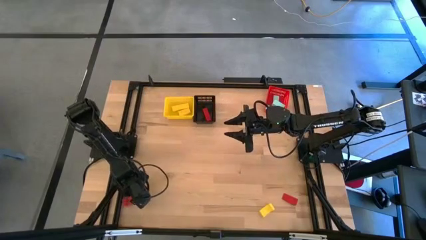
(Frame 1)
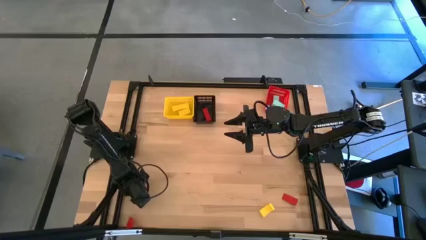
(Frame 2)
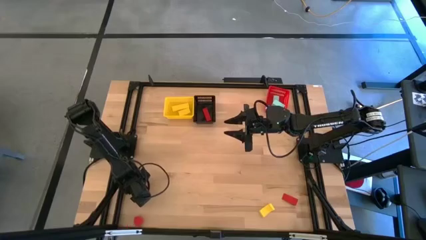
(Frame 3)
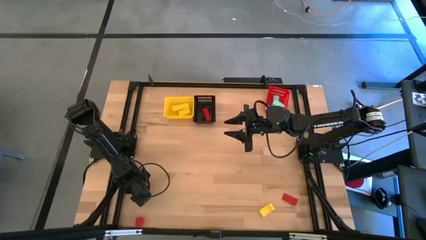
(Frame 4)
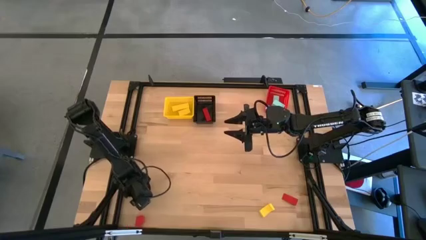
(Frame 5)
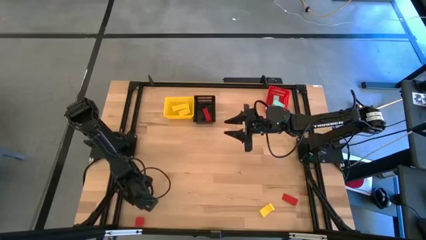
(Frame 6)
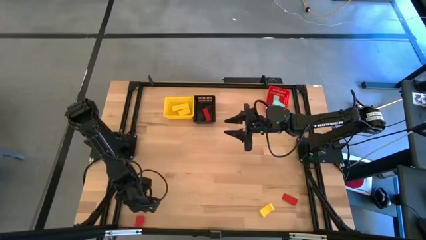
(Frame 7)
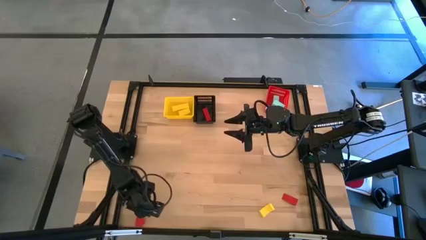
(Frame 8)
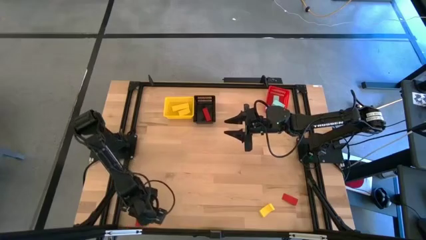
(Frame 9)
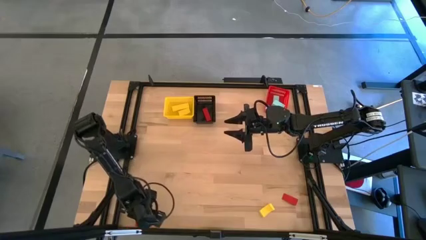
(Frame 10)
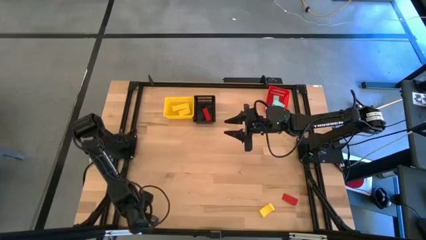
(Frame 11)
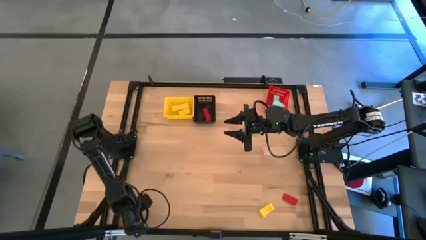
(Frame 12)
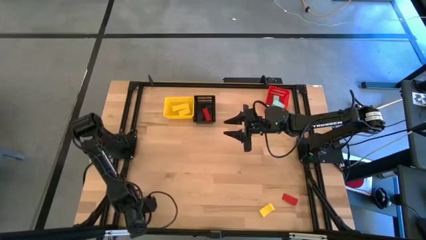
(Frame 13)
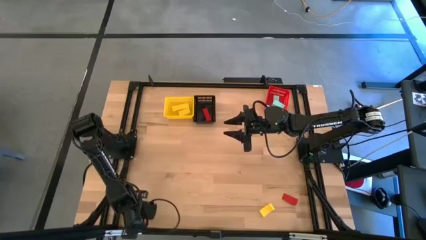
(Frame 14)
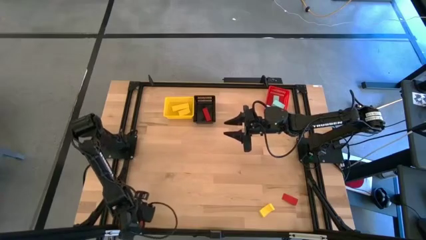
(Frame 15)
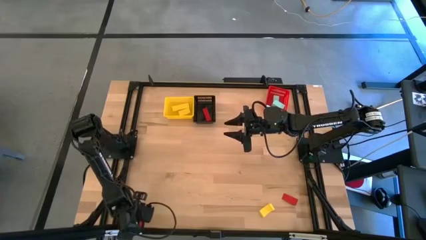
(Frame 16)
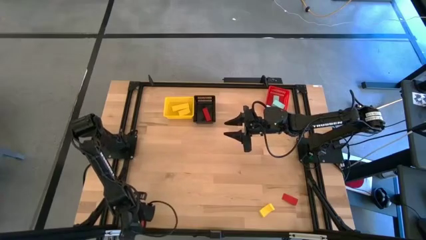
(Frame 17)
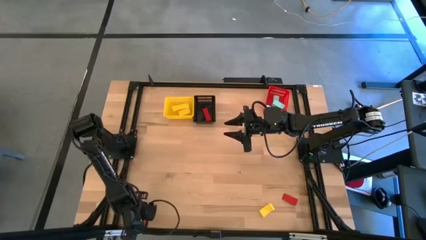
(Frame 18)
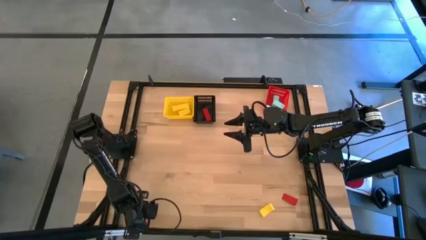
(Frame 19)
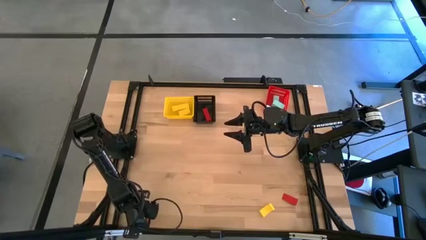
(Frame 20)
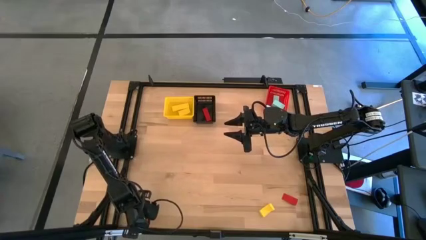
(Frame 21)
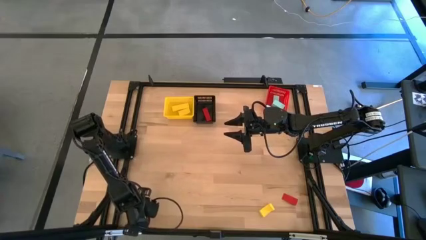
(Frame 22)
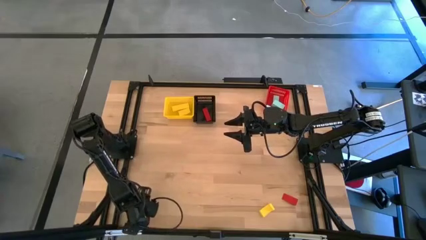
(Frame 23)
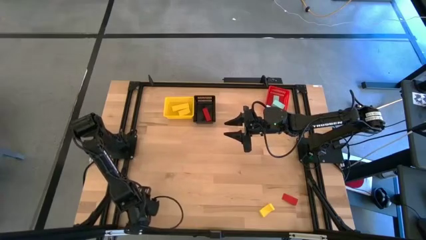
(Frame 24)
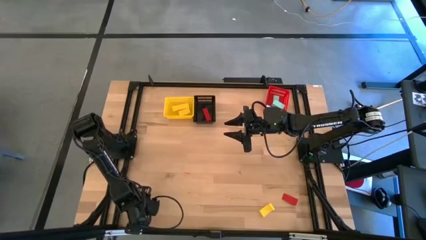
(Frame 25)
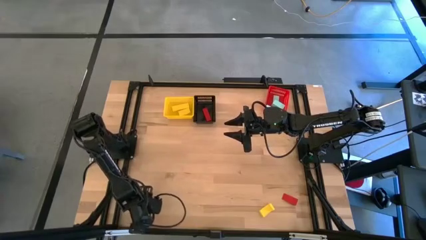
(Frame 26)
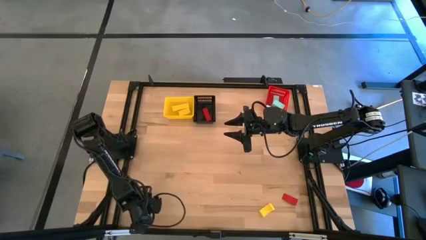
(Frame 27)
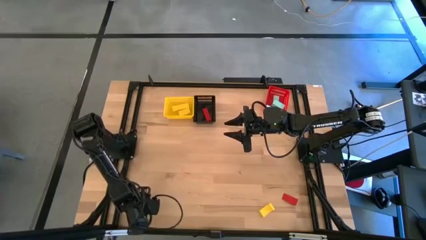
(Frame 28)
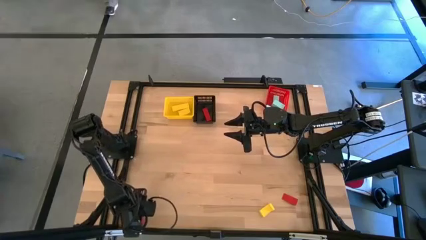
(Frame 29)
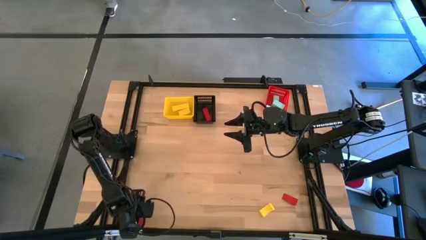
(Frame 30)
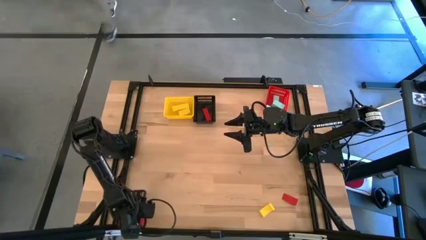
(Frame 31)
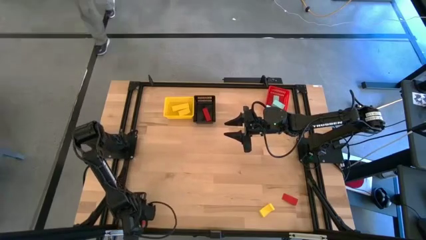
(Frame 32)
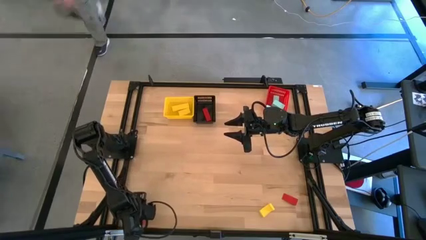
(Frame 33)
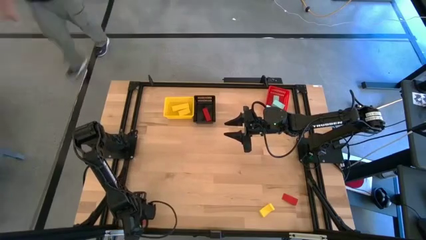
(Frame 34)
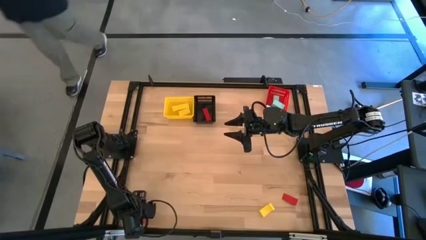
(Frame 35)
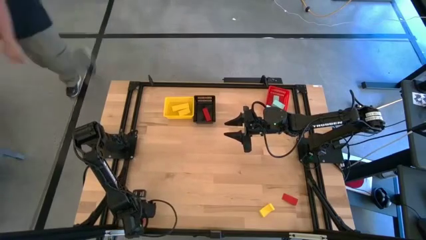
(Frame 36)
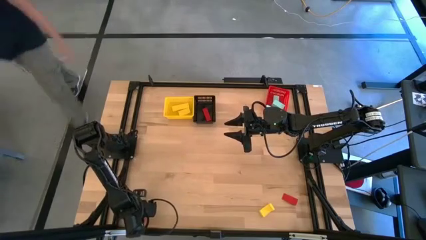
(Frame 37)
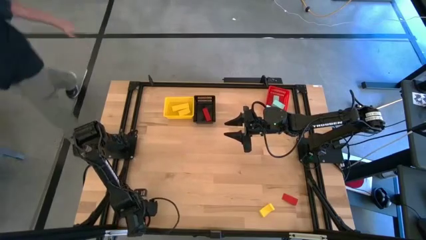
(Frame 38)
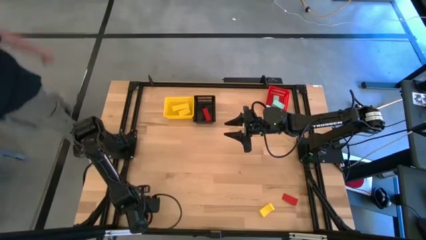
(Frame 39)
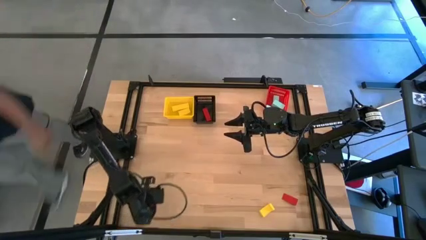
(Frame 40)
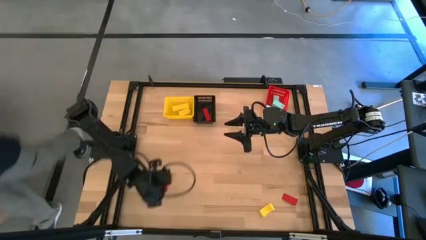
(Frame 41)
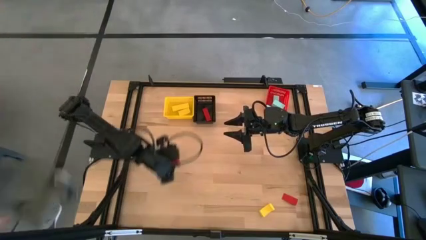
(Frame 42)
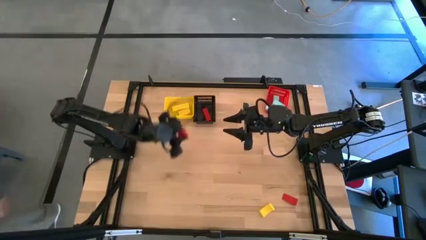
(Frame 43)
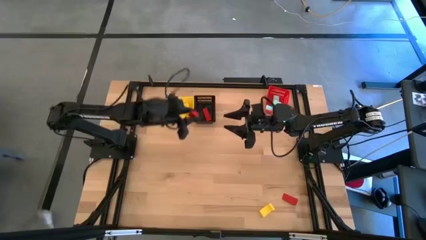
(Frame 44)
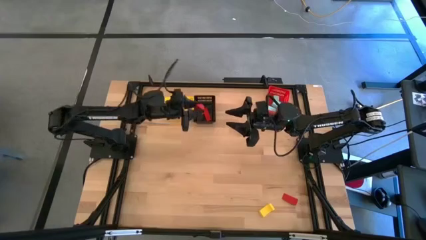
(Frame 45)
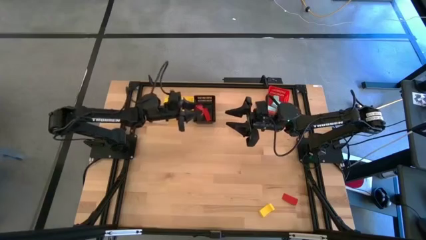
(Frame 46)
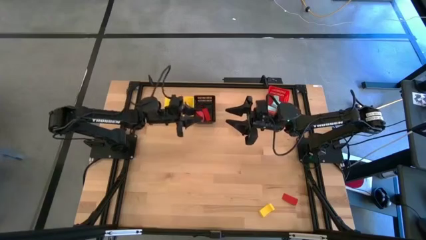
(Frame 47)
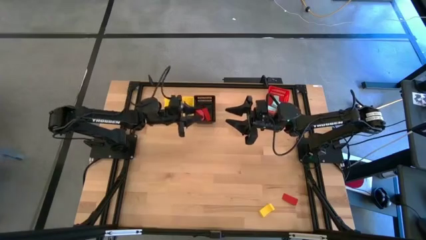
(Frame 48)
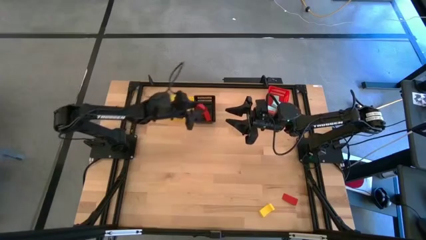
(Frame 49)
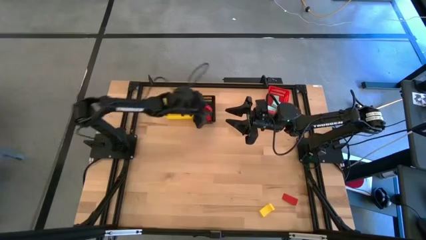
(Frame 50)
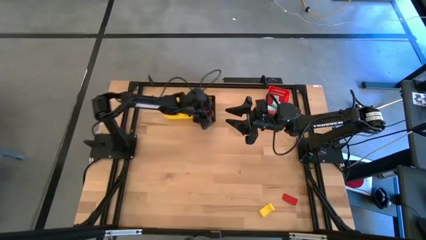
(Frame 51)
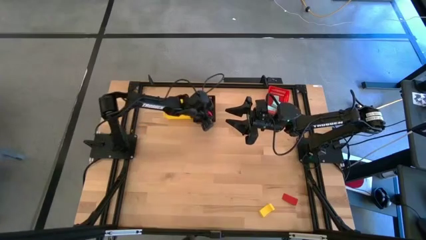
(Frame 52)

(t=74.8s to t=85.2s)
Task: Sort & place blocks by color
Put the bottom red block into the black bin

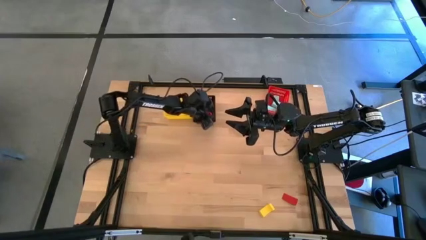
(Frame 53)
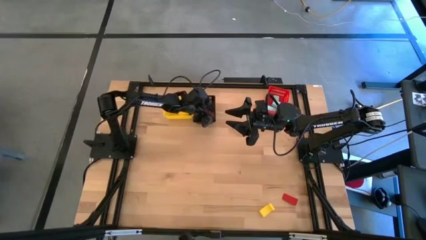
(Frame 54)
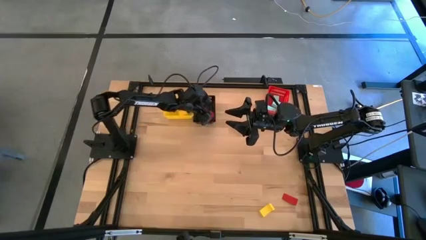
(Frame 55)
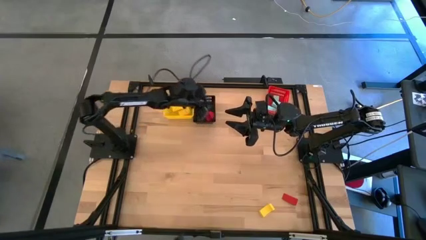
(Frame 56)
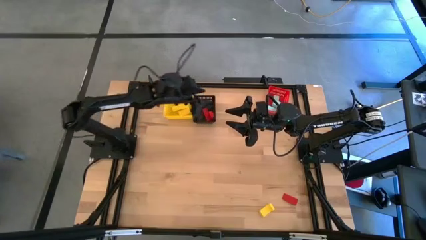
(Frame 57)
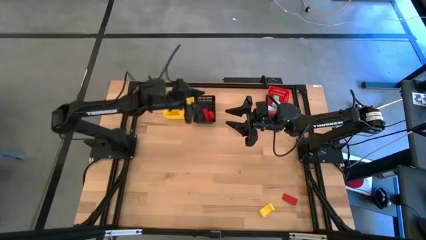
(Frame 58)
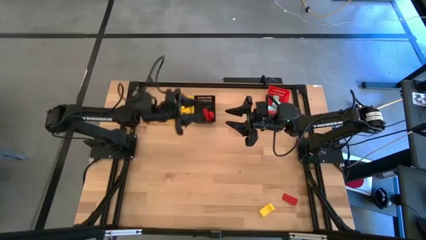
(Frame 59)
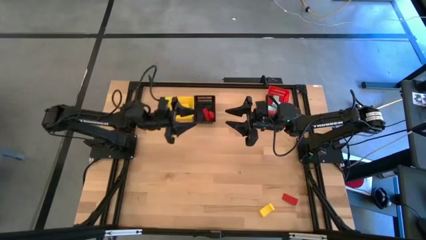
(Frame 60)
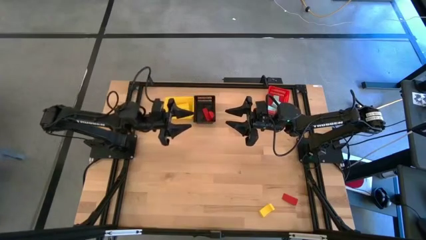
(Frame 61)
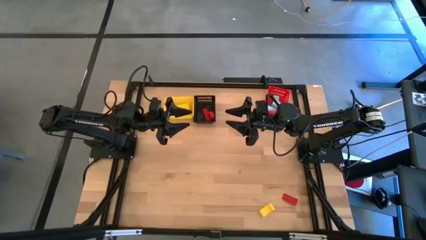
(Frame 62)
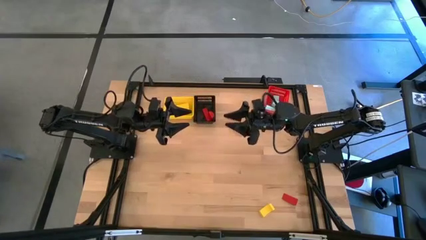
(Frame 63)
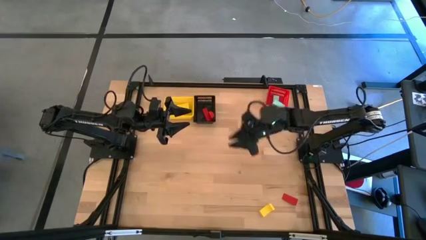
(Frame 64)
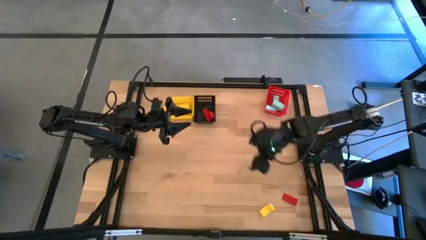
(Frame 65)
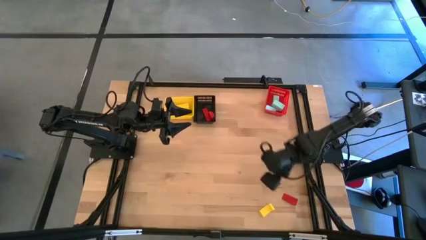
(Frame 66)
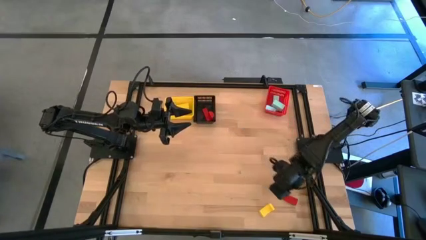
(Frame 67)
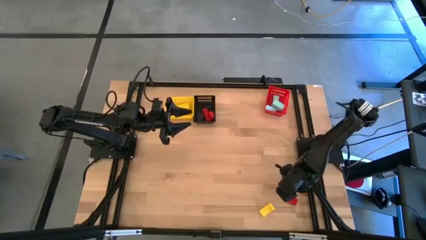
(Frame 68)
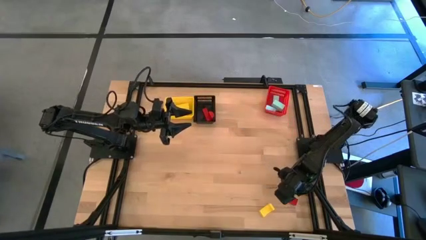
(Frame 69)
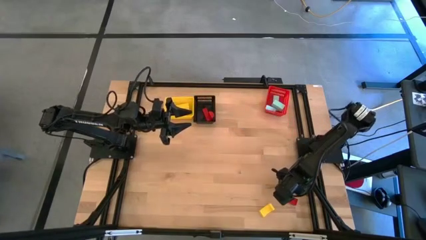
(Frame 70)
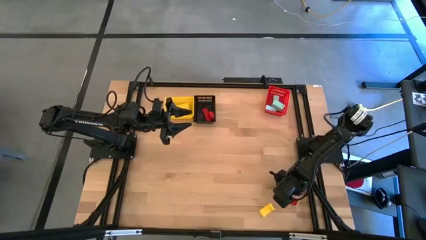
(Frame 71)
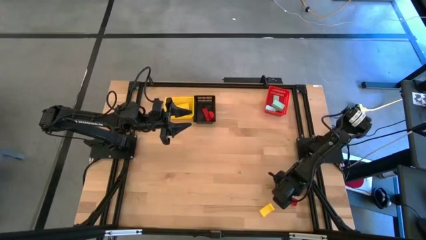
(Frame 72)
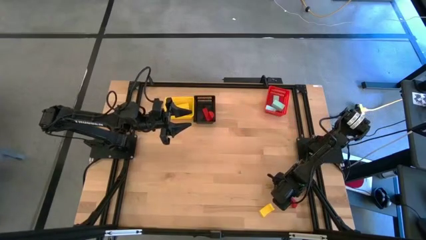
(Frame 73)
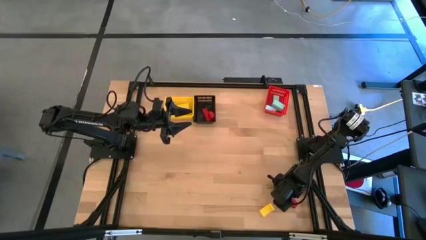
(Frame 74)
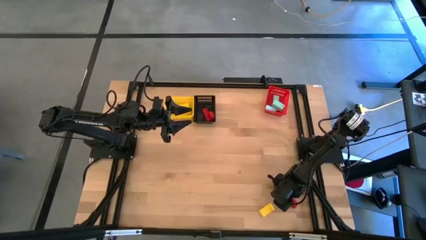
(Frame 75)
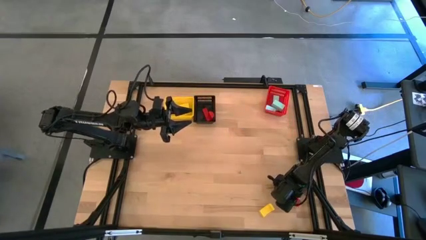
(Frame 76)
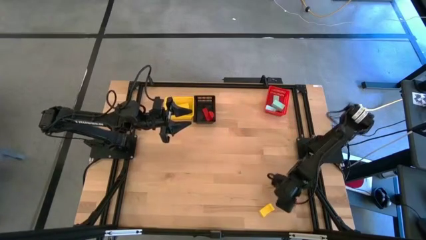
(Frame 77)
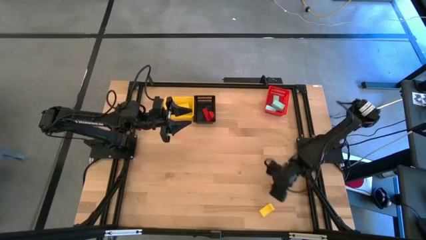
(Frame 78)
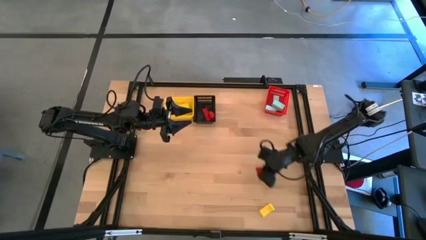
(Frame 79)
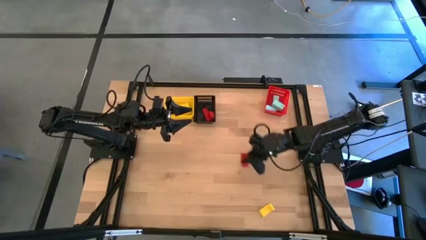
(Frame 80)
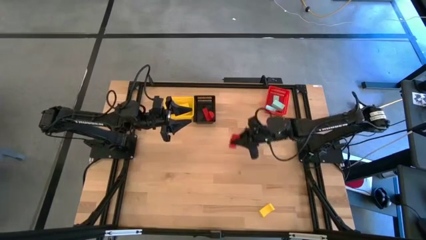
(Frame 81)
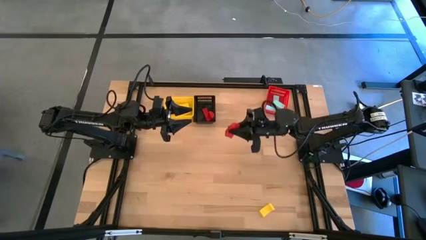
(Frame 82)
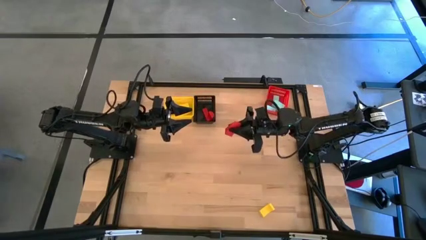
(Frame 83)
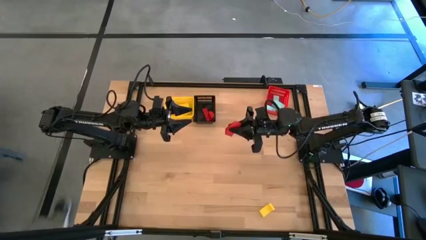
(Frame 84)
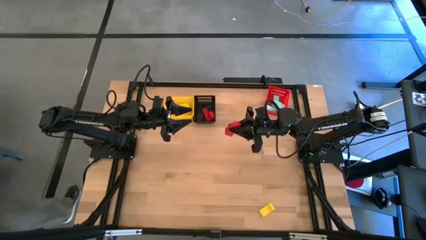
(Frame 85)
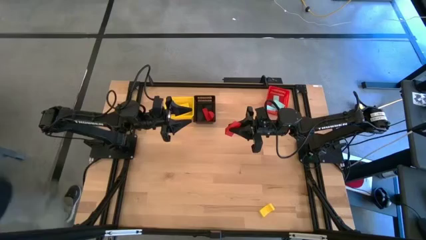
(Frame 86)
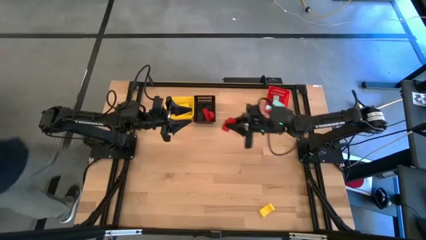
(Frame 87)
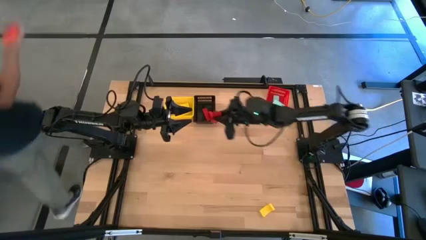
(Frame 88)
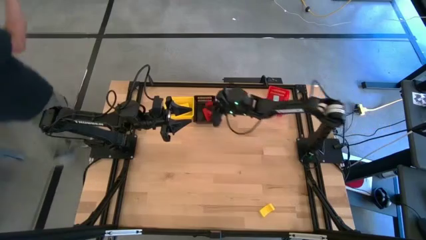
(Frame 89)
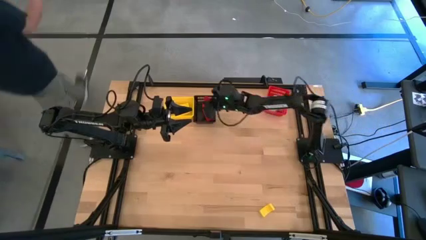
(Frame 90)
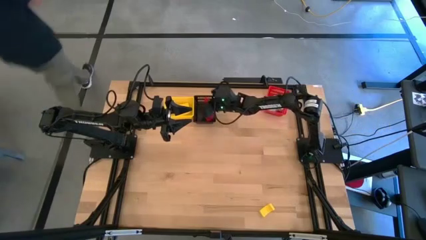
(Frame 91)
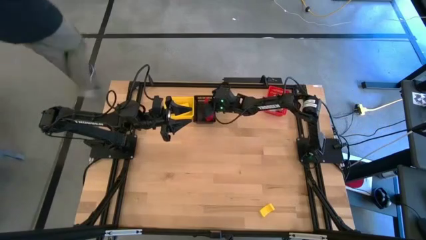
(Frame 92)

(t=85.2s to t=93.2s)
Put the red block into the black bin
